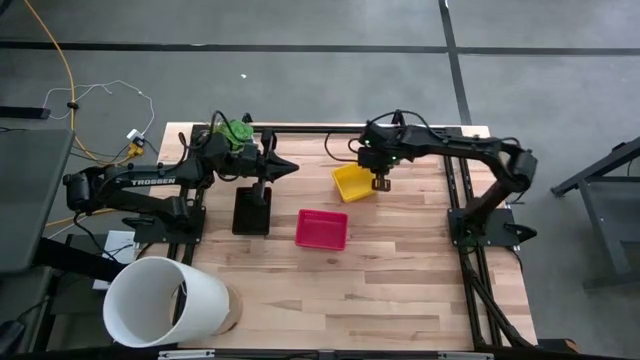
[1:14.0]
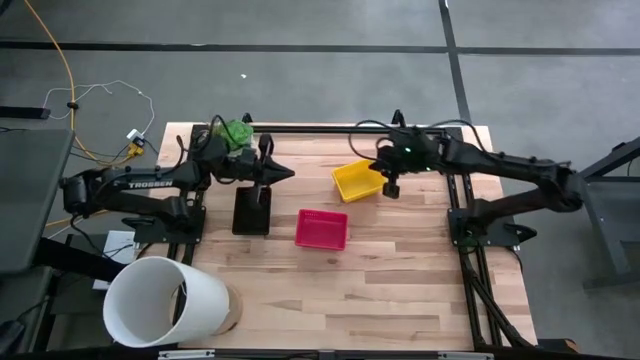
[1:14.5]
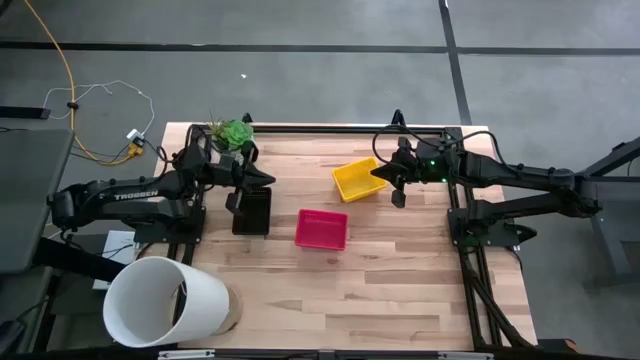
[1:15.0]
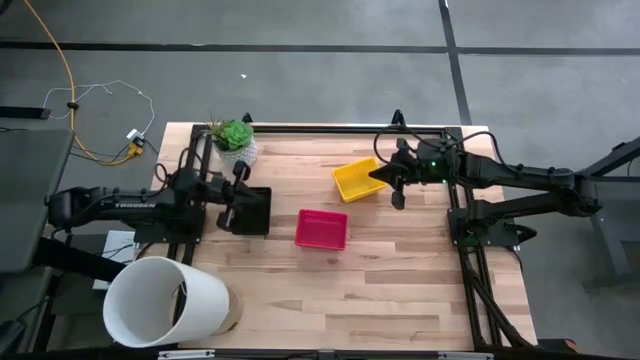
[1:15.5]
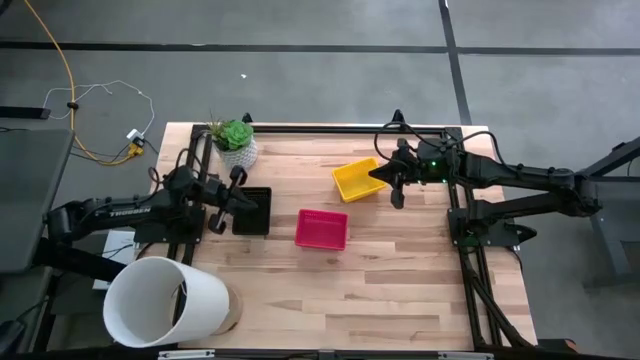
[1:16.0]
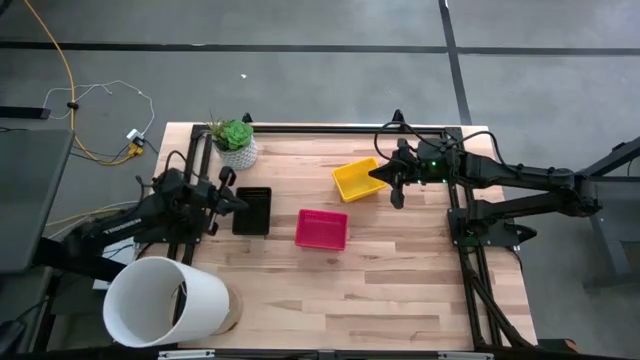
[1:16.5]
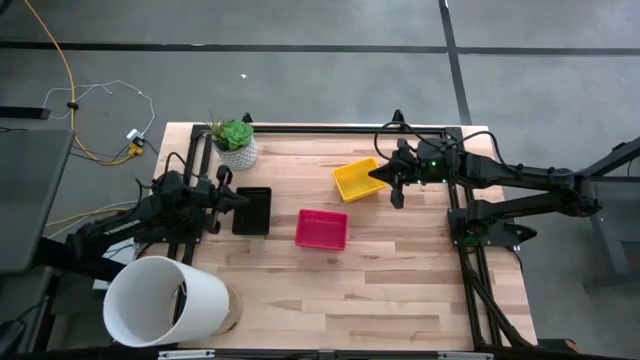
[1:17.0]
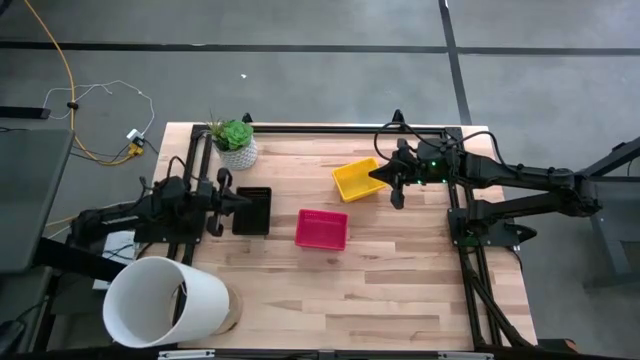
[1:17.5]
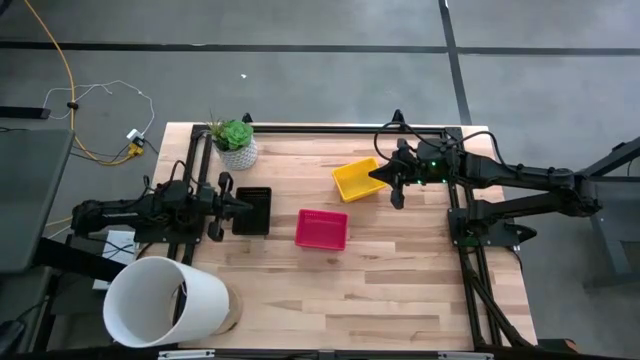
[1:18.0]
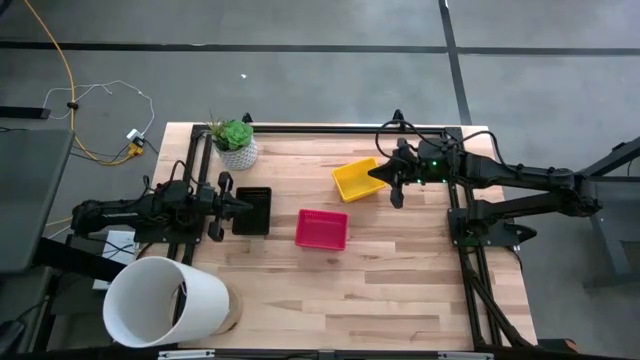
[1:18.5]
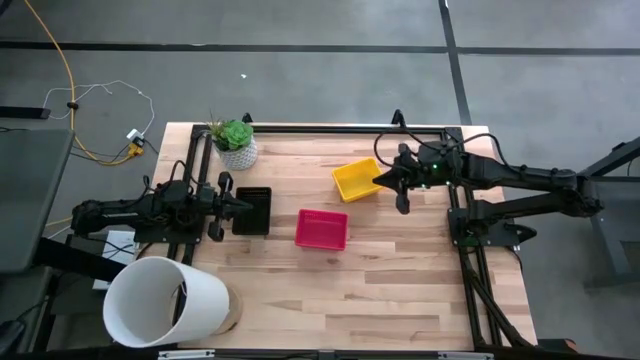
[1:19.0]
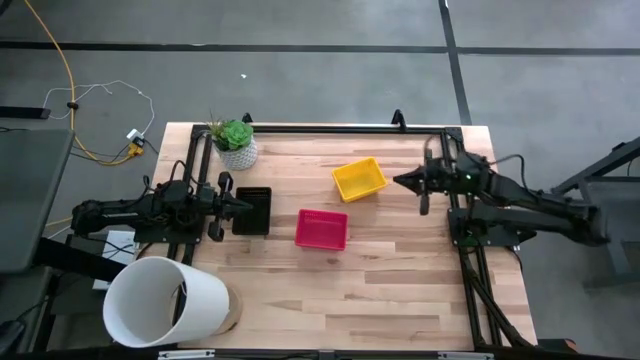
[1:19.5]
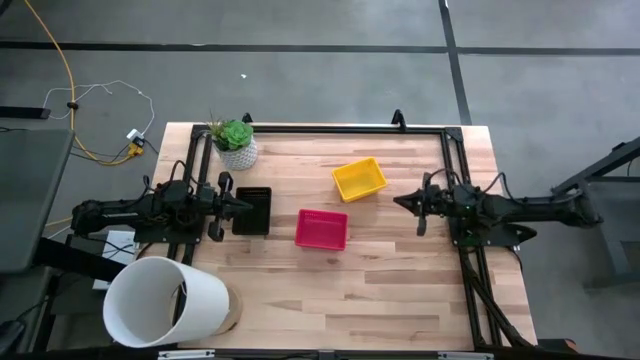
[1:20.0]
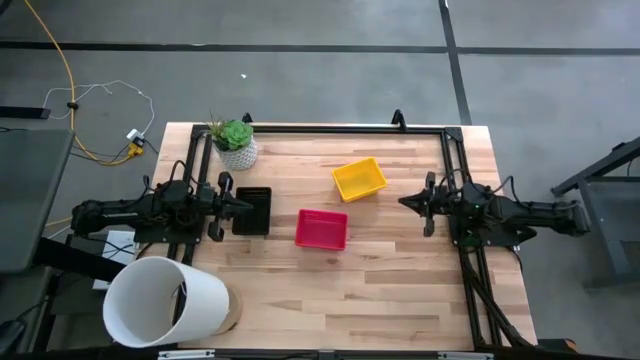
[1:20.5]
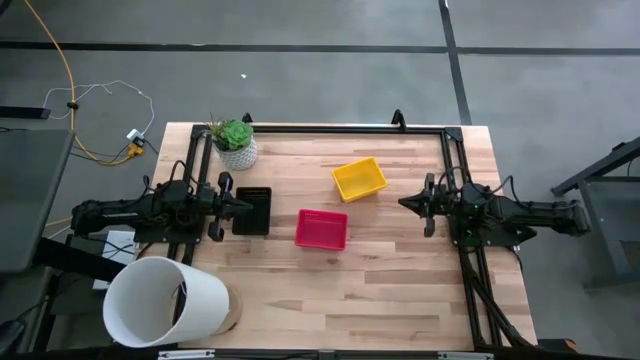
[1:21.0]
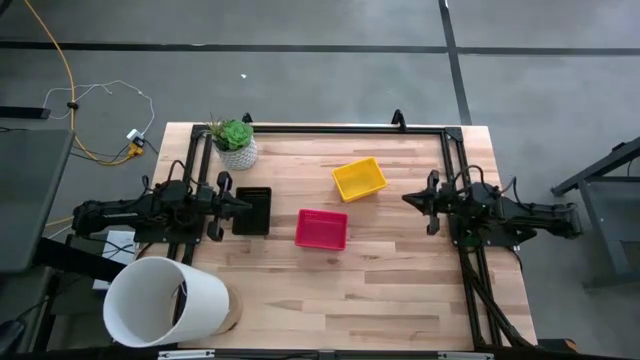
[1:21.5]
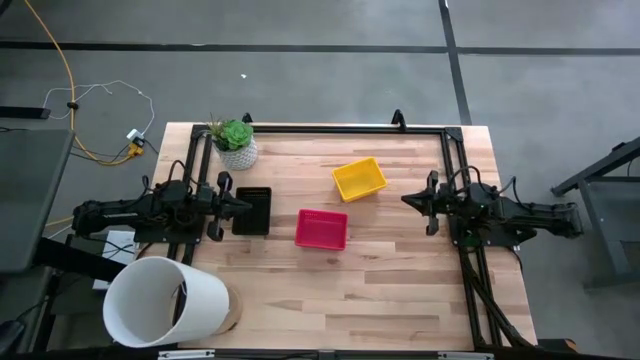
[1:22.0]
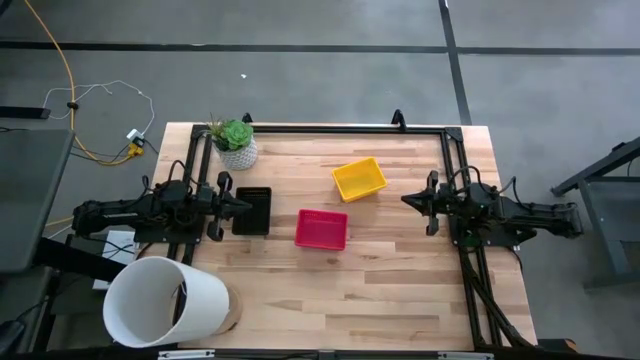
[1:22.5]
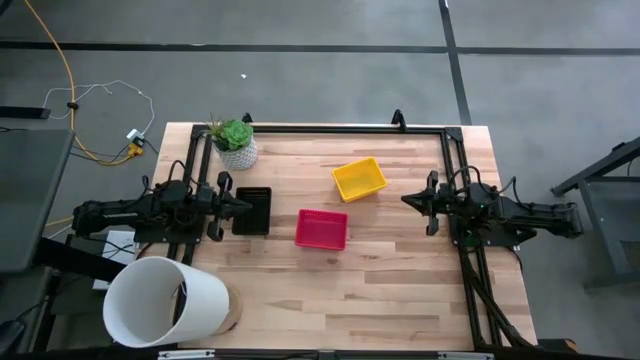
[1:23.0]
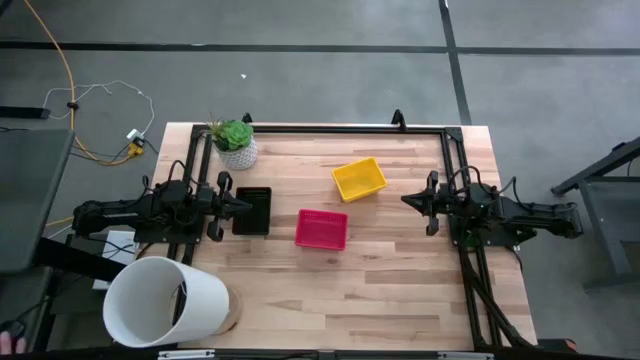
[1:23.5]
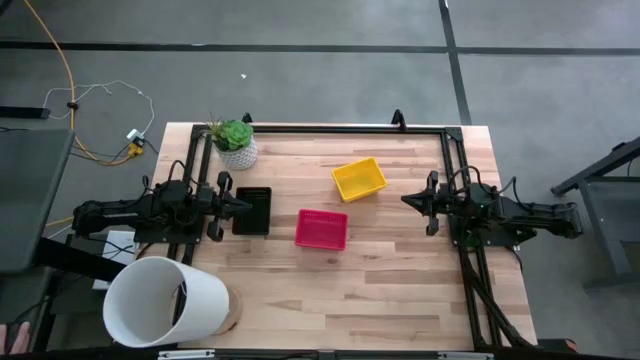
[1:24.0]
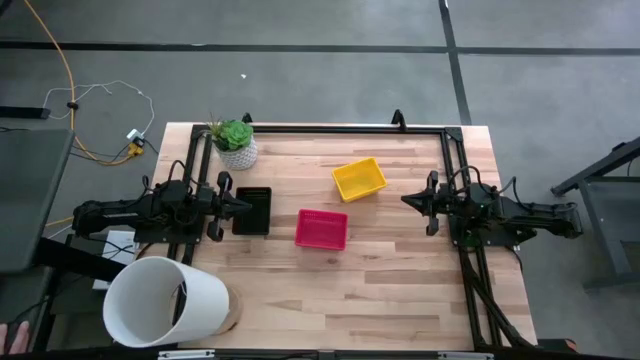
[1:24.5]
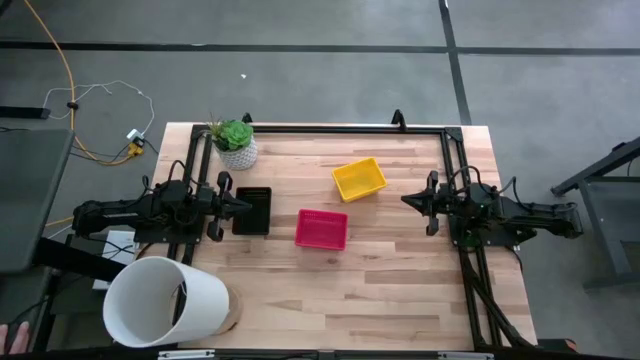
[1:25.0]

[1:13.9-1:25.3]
Return to Home Position

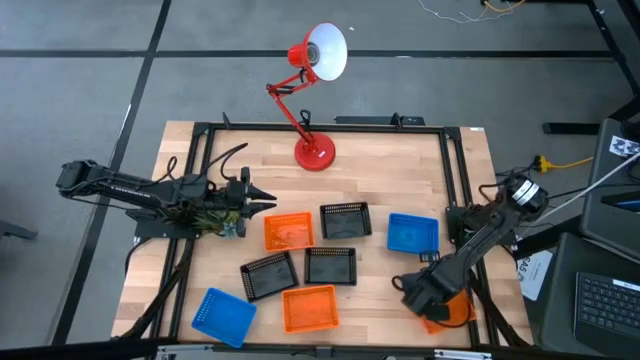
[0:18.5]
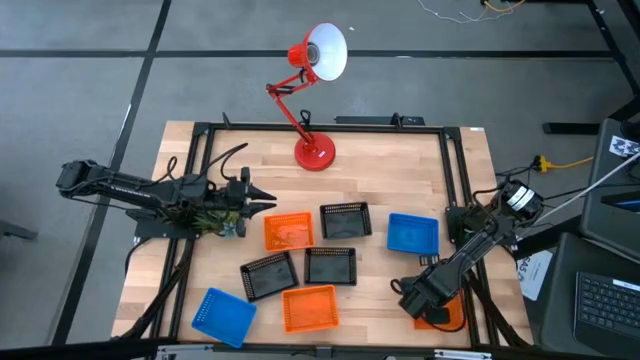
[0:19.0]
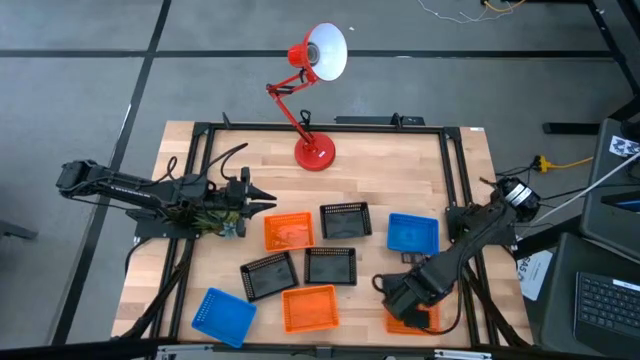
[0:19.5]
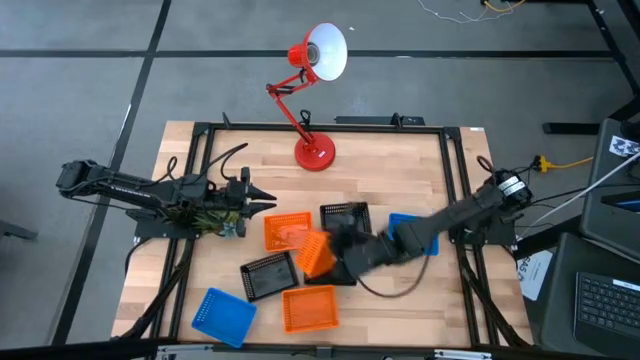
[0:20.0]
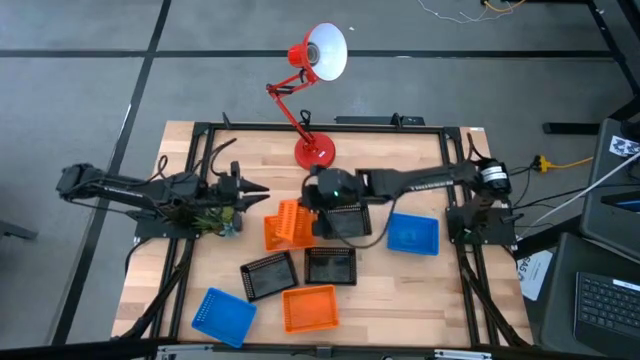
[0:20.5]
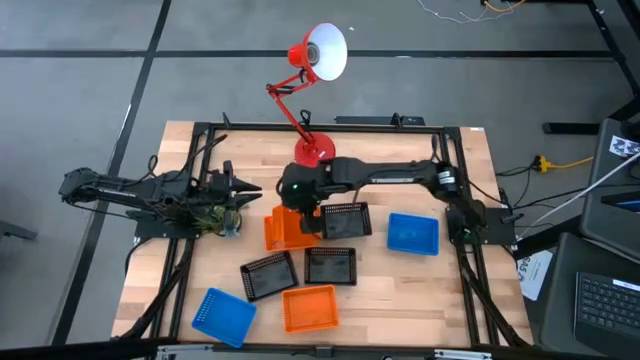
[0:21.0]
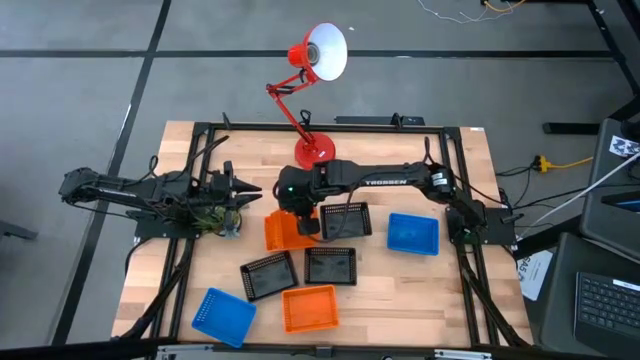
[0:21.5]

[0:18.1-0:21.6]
Stack the right orange bin on the top left orange bin

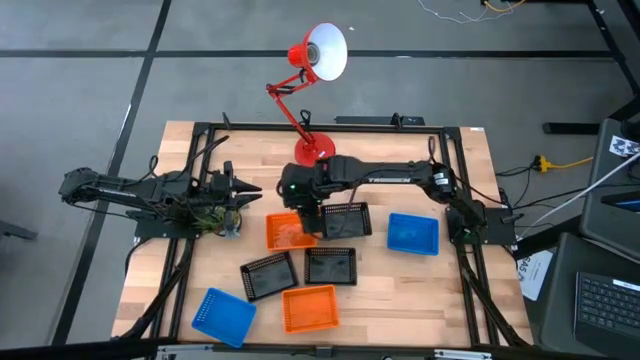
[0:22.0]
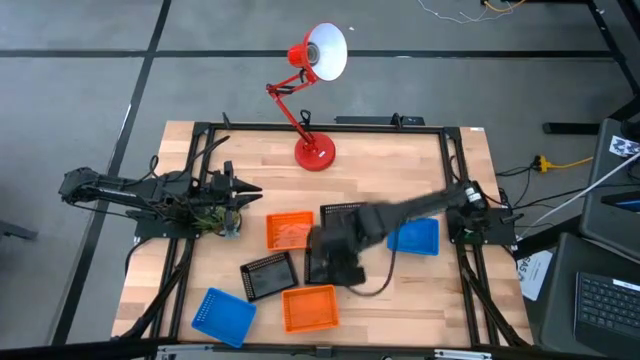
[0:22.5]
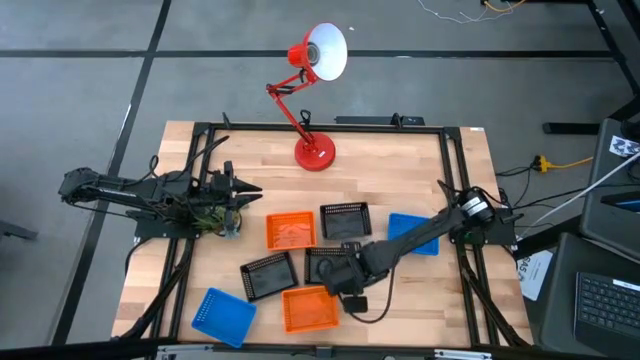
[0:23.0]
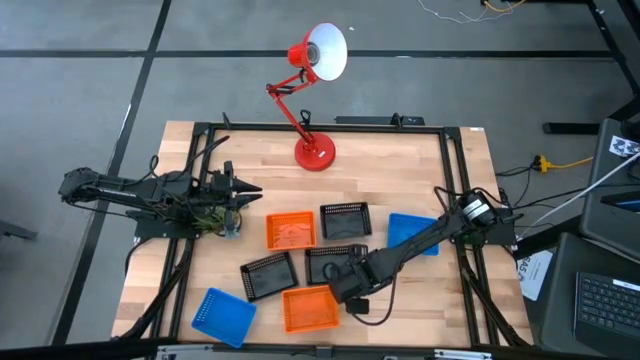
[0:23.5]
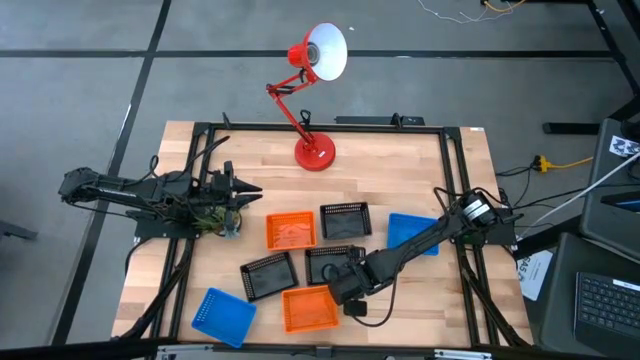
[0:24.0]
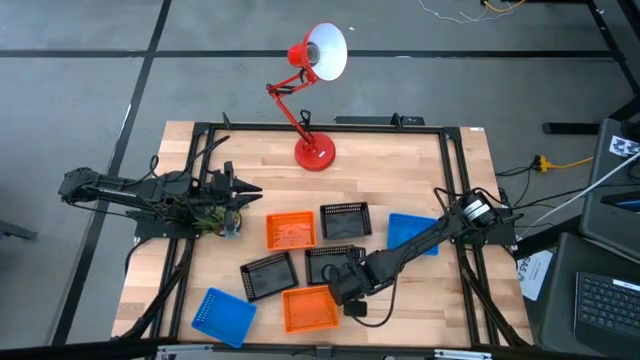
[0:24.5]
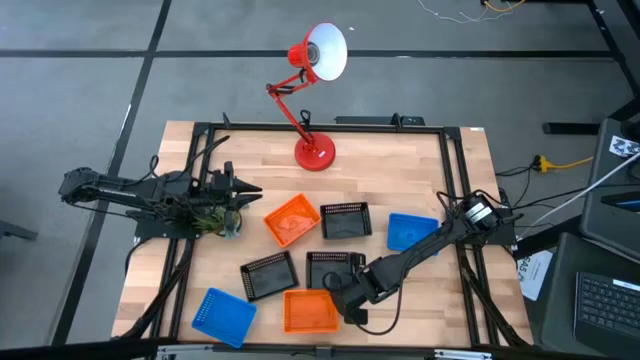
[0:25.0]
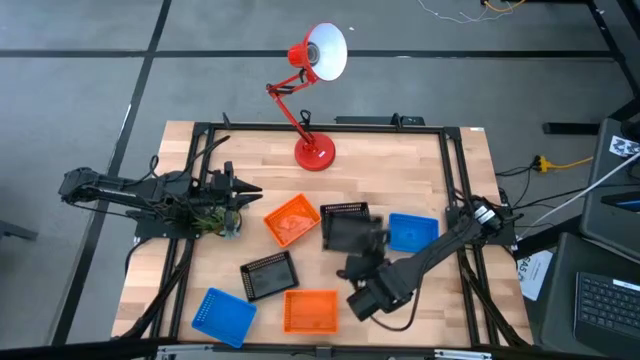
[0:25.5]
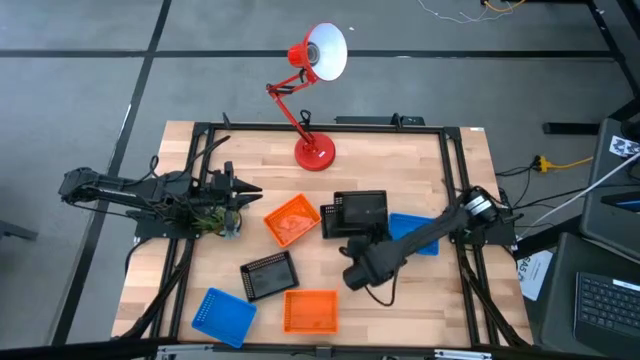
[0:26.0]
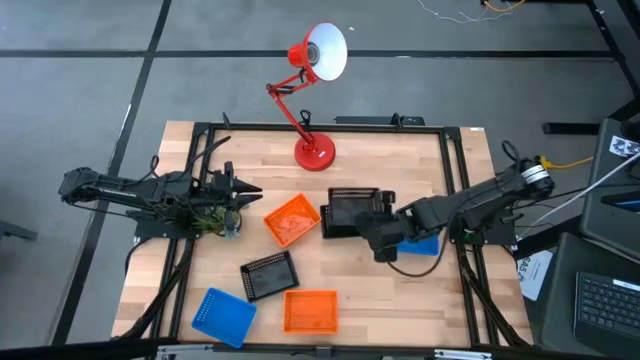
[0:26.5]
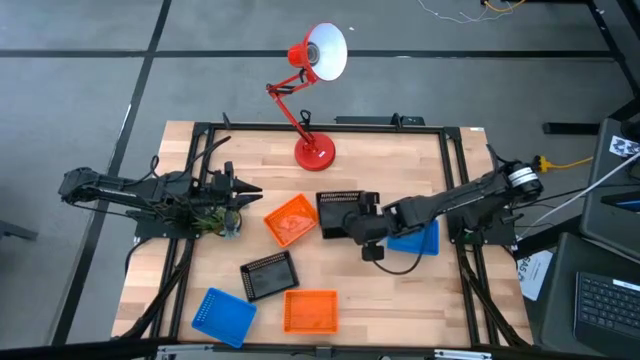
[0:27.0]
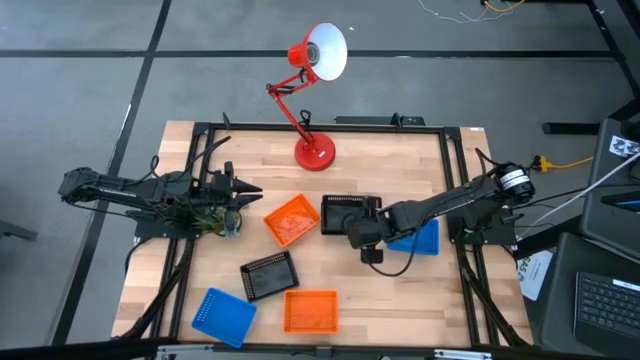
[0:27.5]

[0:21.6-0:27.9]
Stack the bottom right black bin on the top right black bin

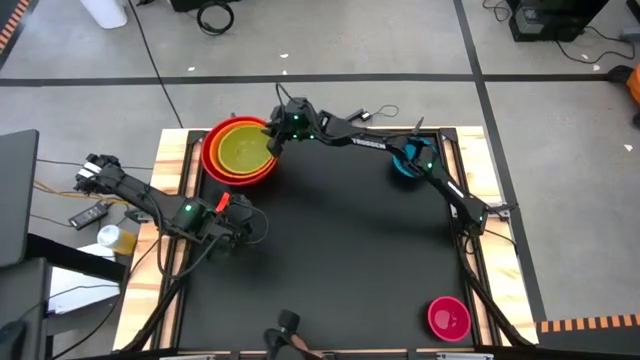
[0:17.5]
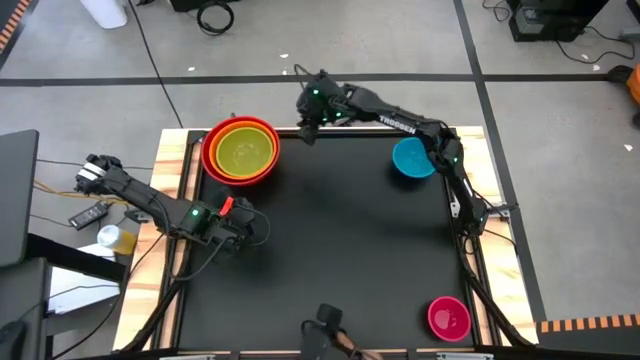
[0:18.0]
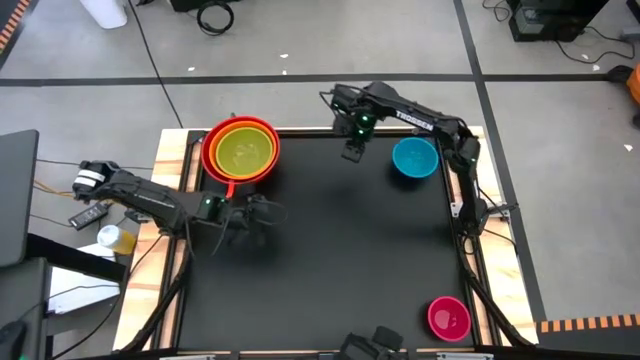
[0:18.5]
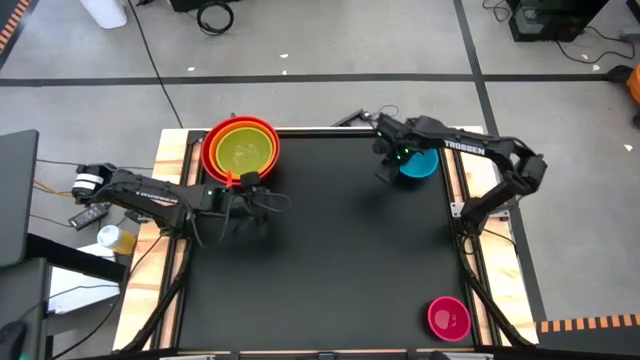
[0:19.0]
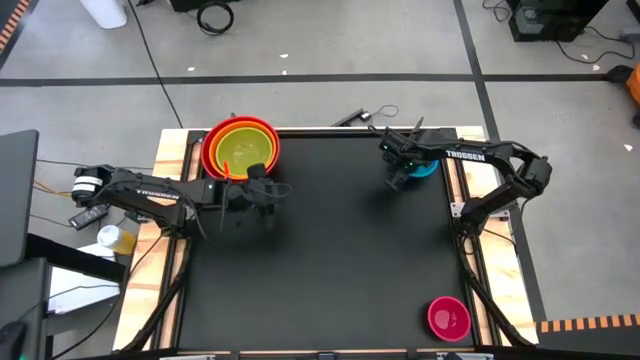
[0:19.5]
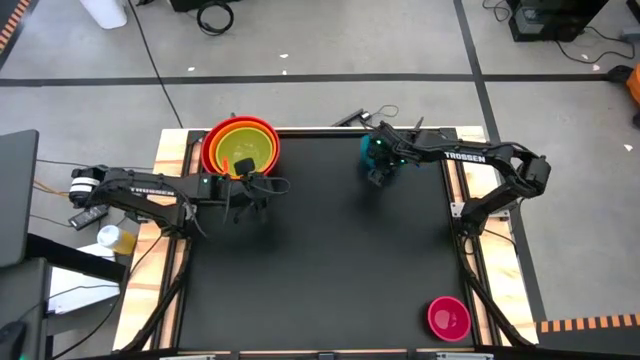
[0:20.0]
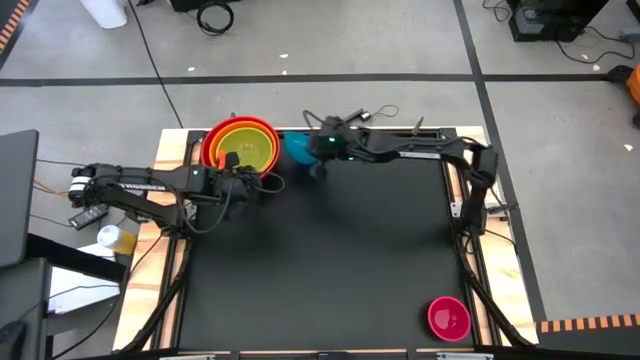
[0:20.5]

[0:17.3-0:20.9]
Stack the blue bowl on top of the green bowl
